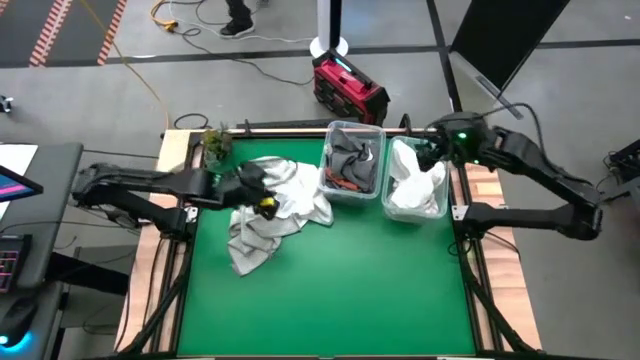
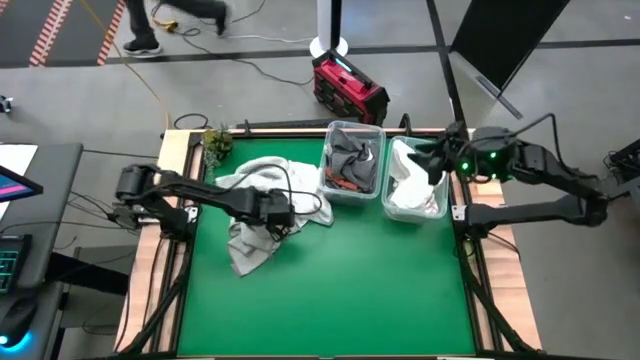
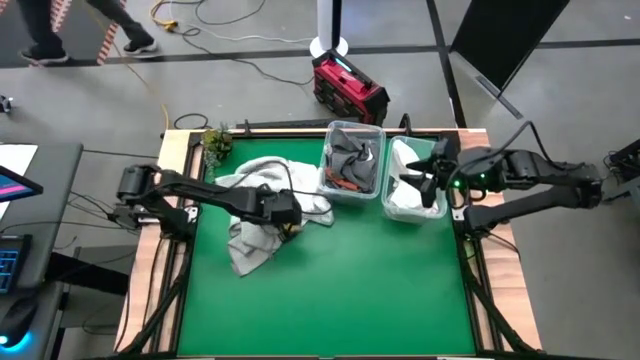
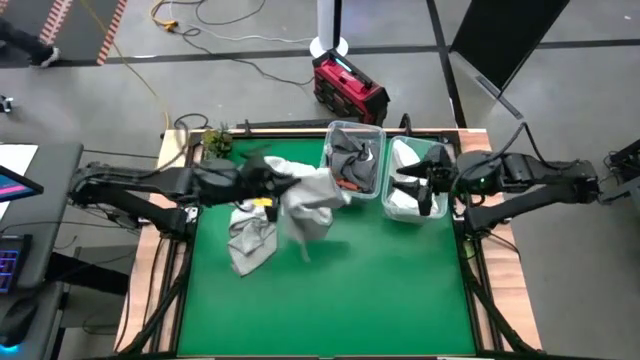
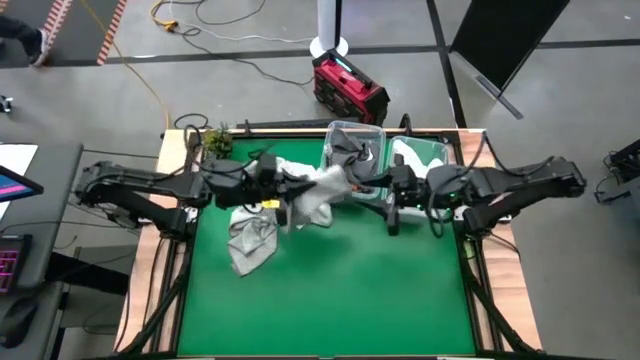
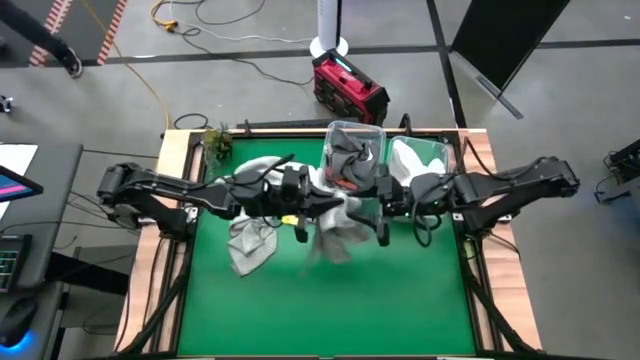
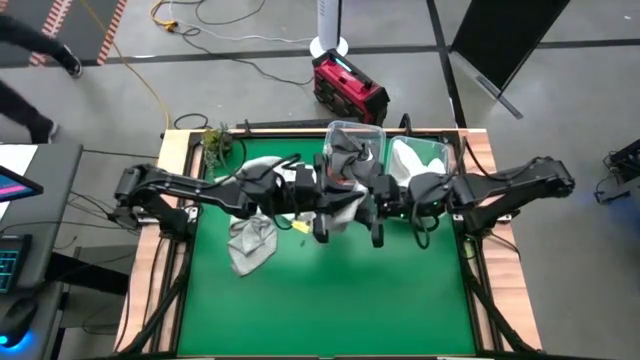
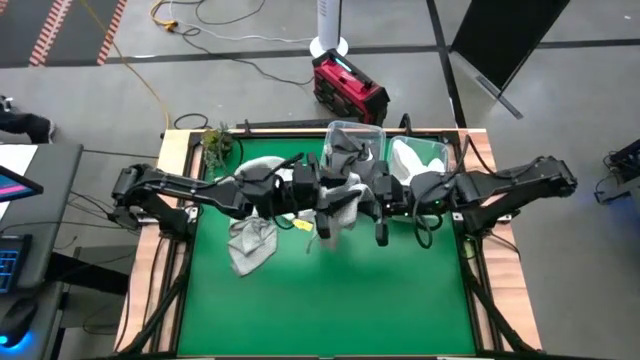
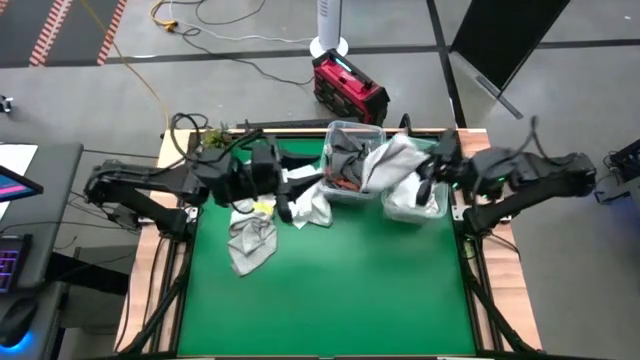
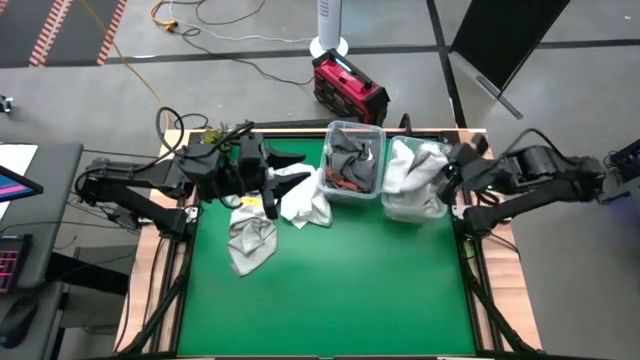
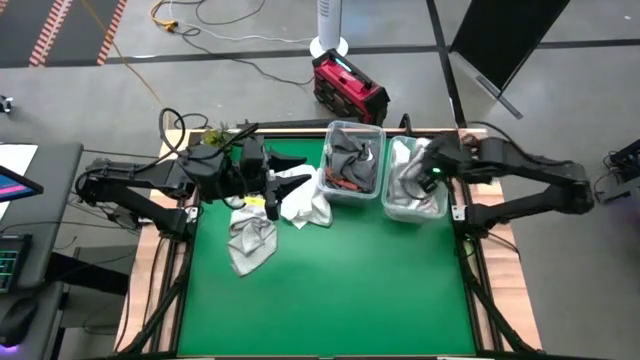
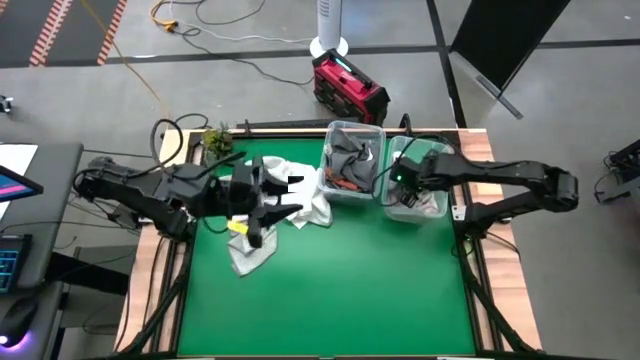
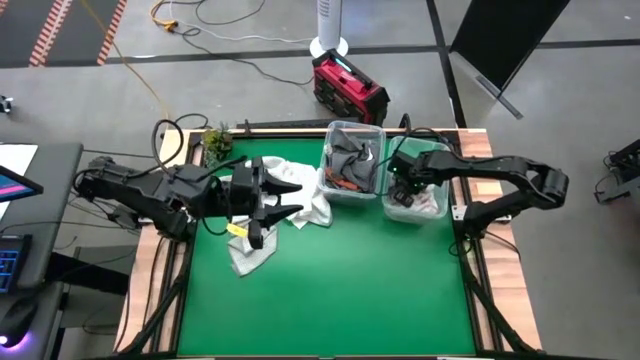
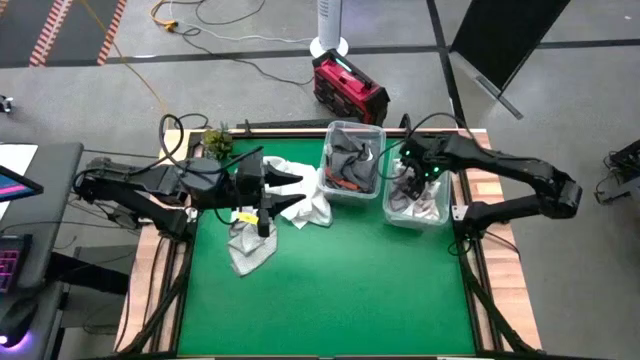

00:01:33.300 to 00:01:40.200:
Task: Sort towels by color in basket
Put the bottom right gray towel into the right transparent bin

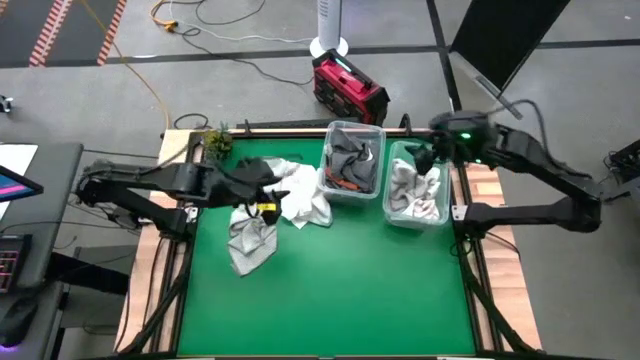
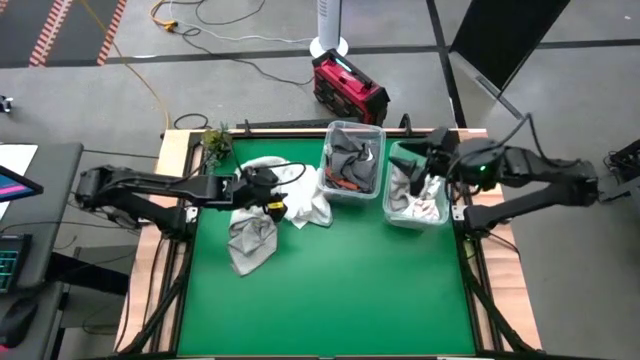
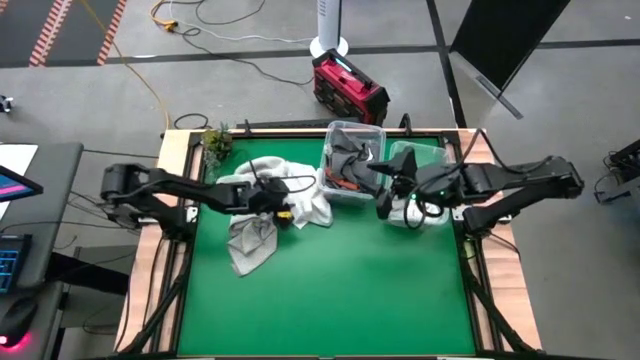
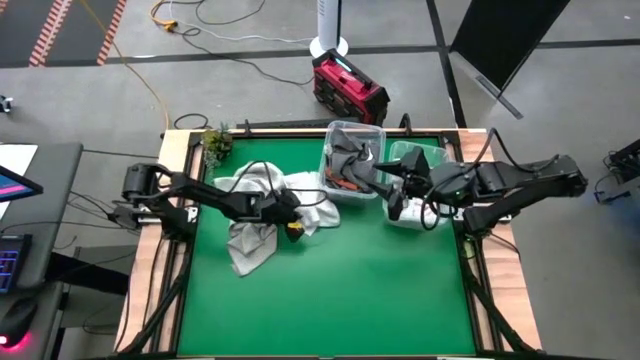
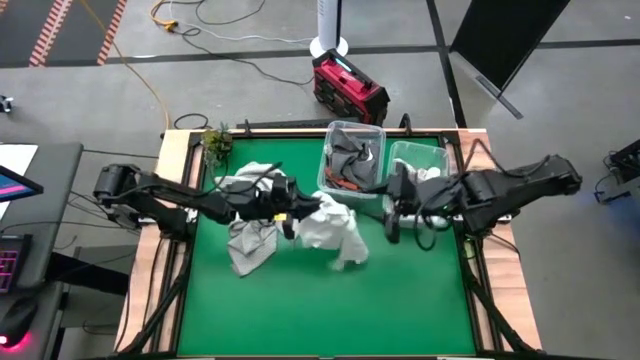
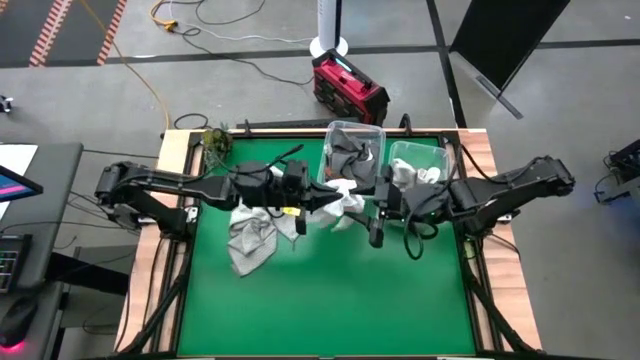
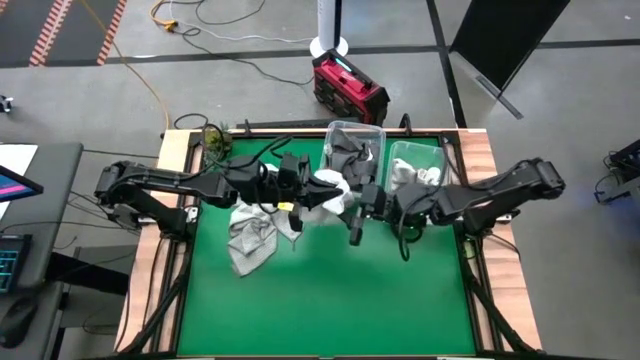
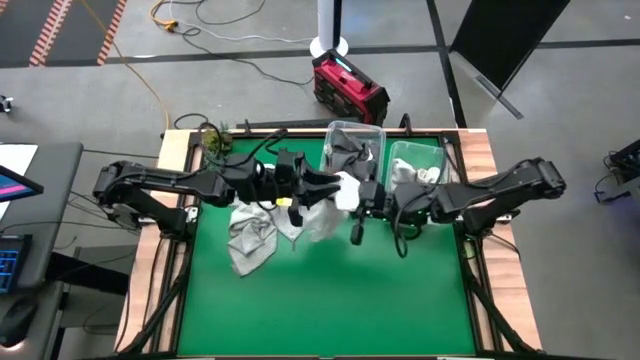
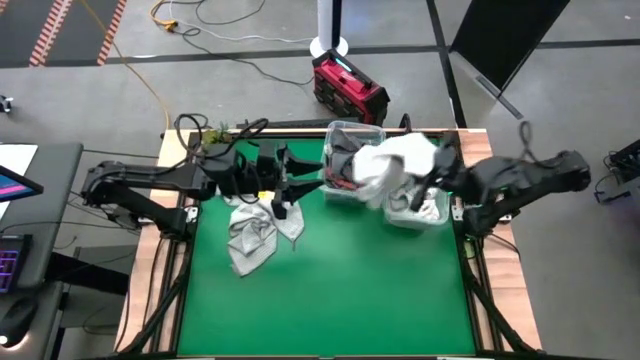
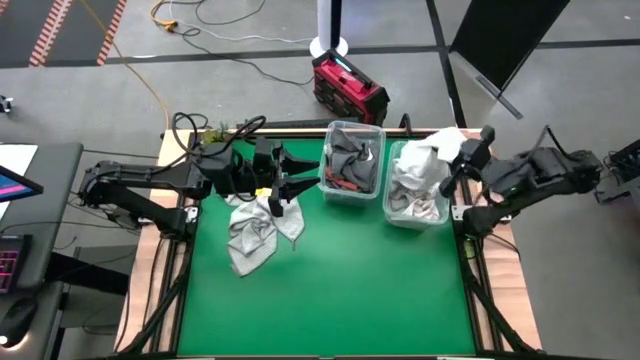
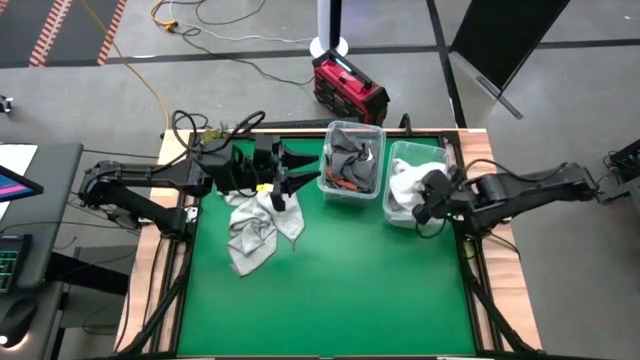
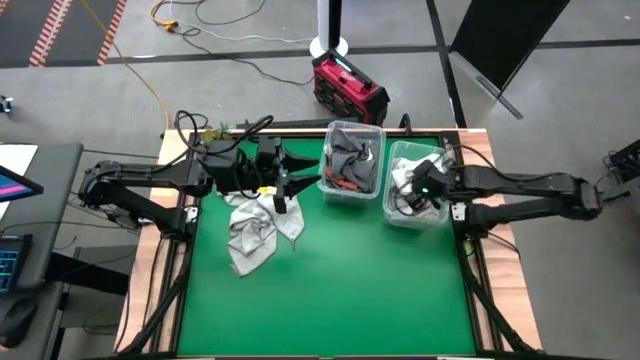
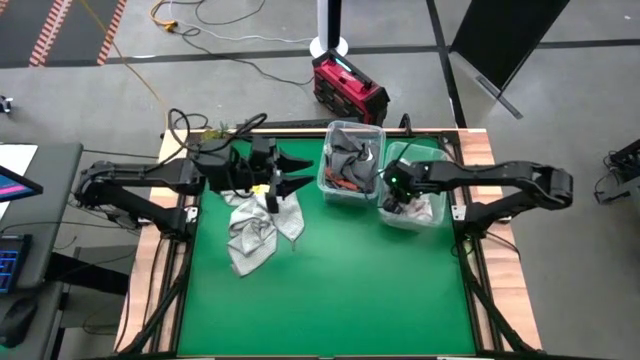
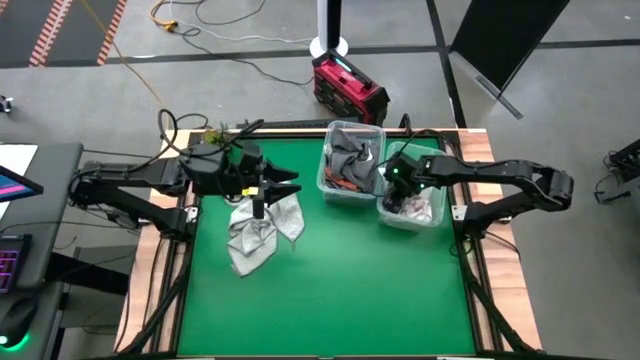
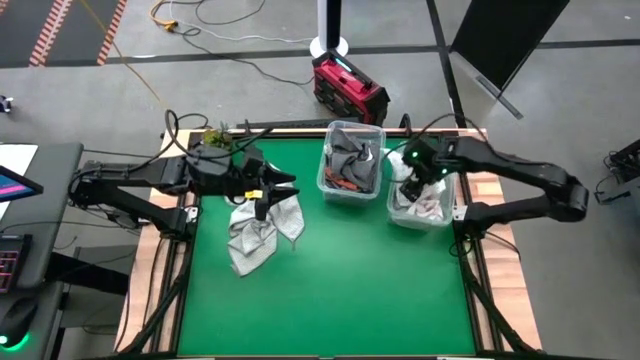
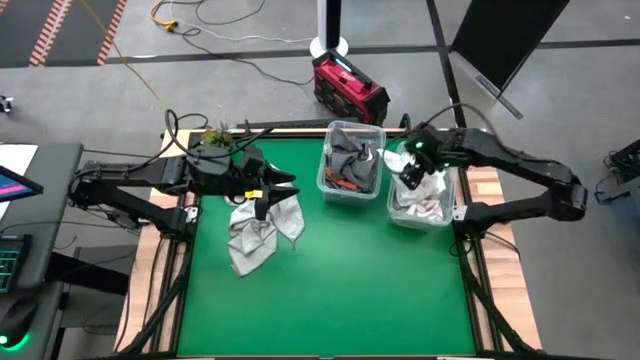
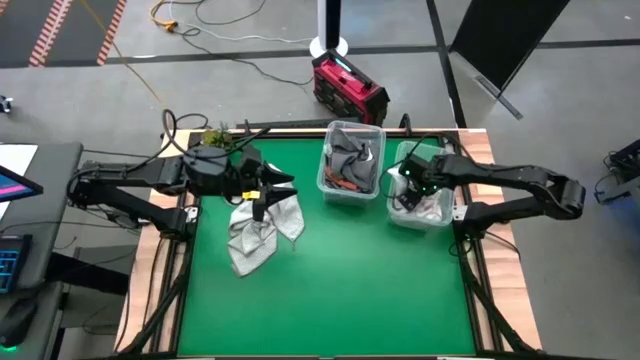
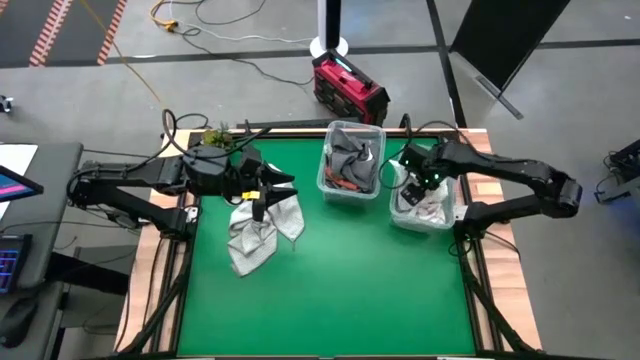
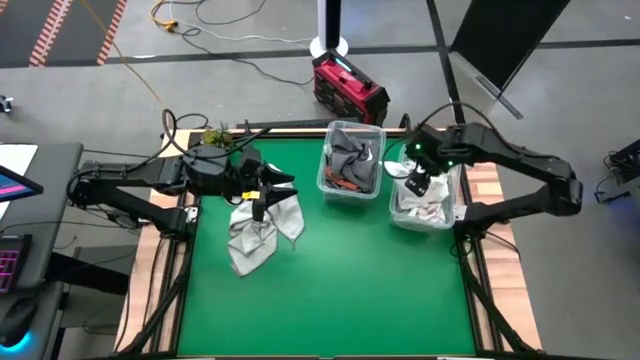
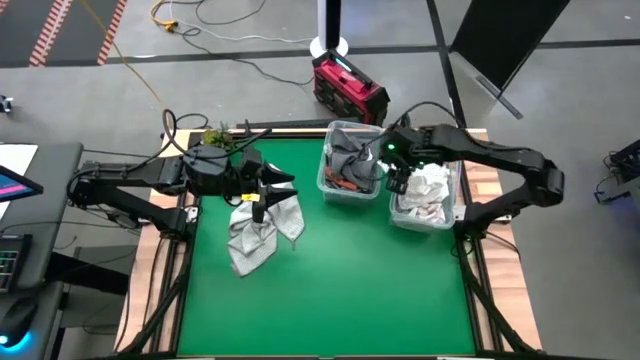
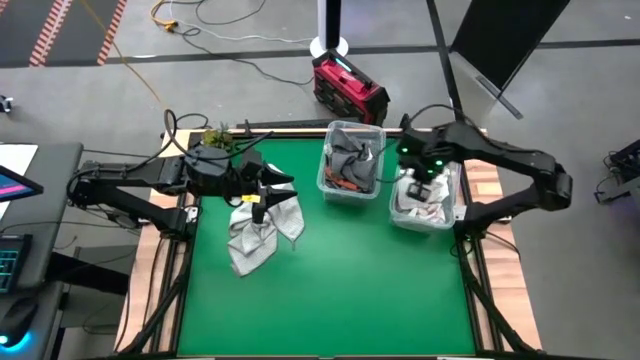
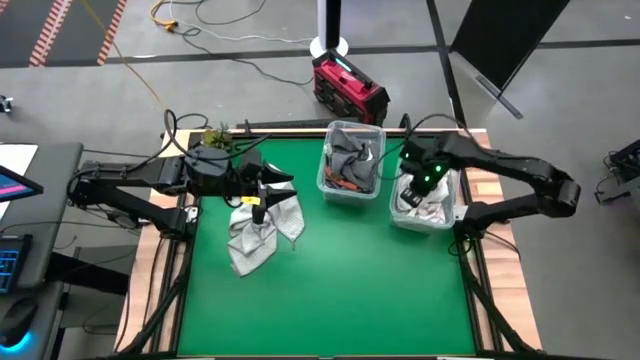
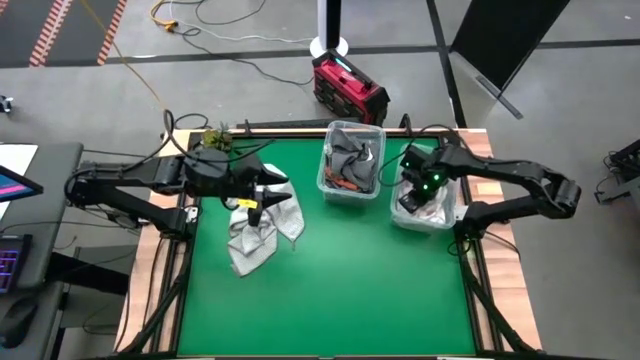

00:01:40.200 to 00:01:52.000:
Put the white towel into the right transparent bin

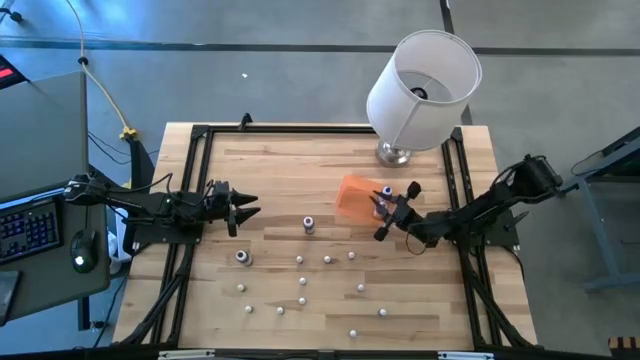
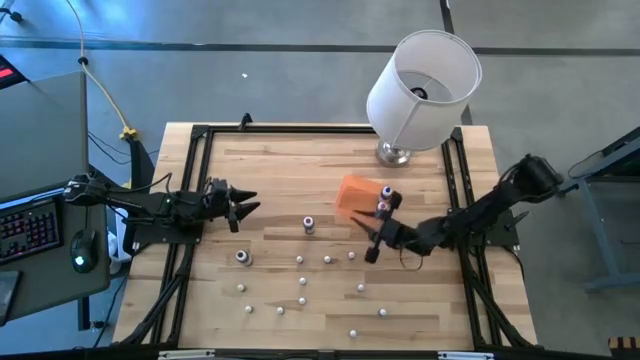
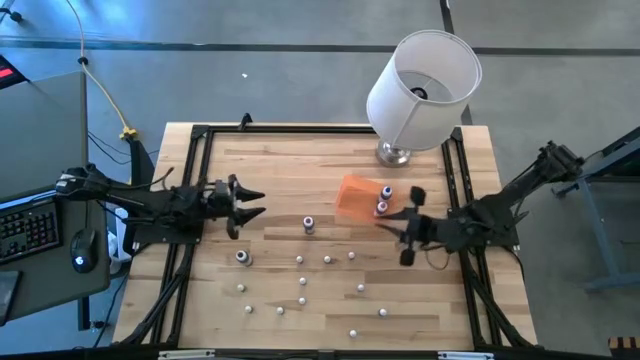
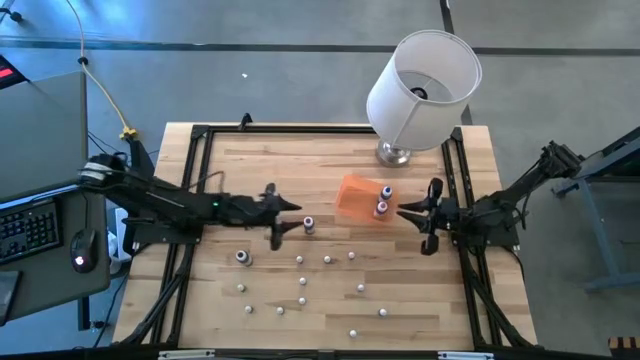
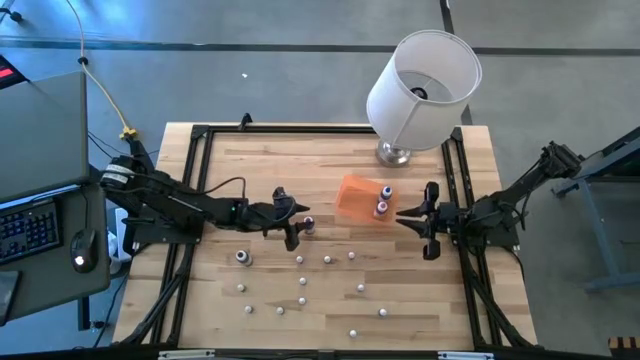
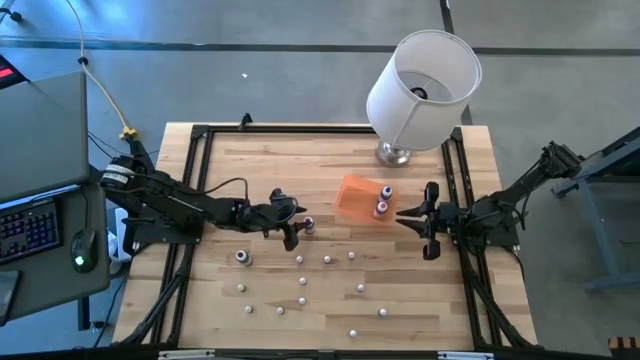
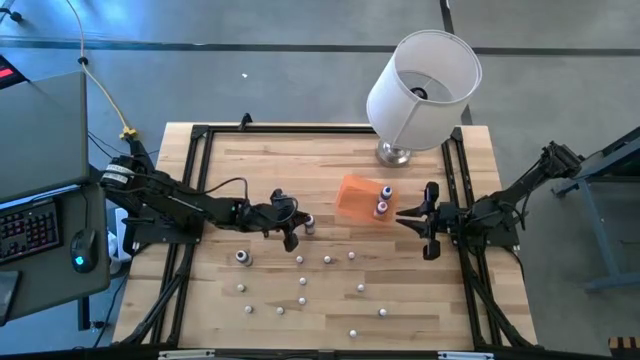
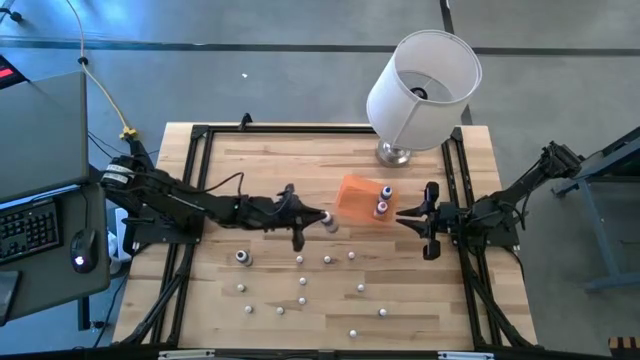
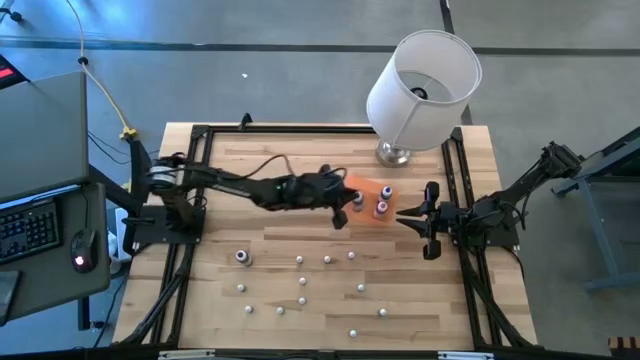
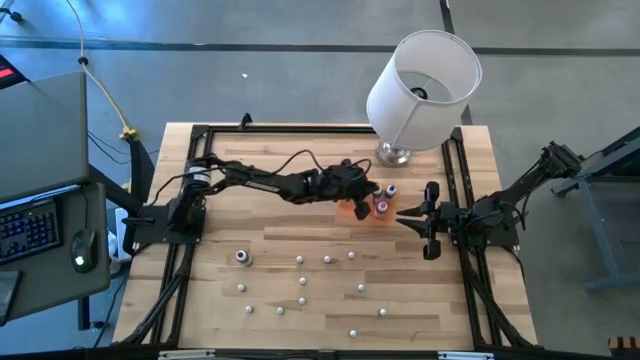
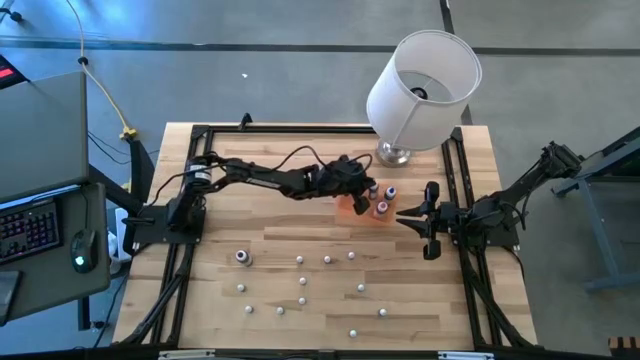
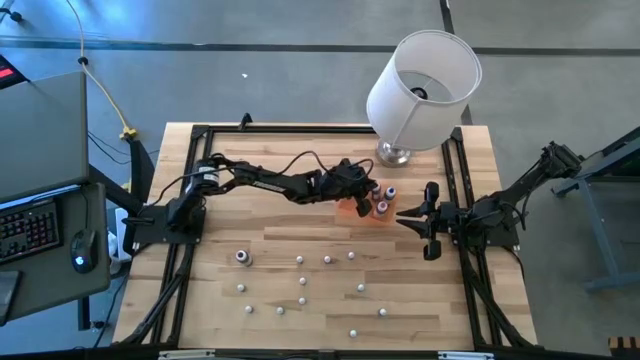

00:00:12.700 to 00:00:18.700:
Task: Pick & Place food coloring
Put the large purple food coloring bottle into the orange container
